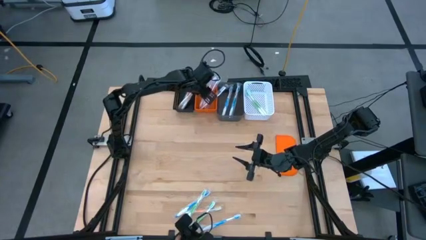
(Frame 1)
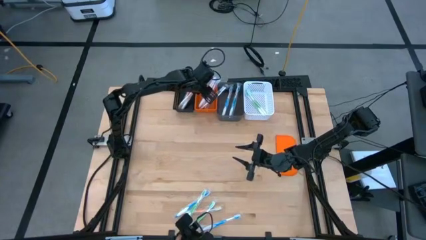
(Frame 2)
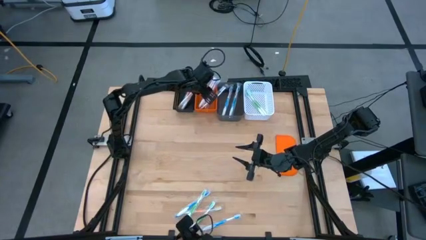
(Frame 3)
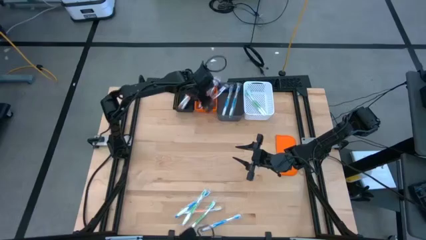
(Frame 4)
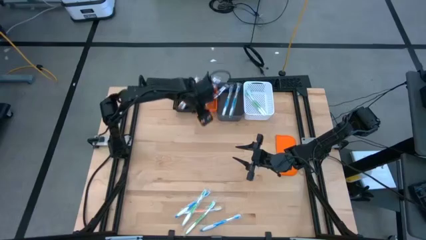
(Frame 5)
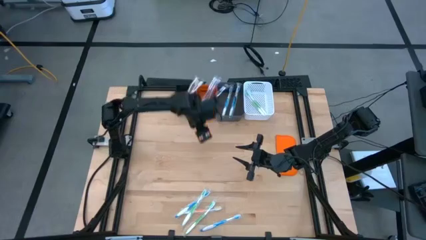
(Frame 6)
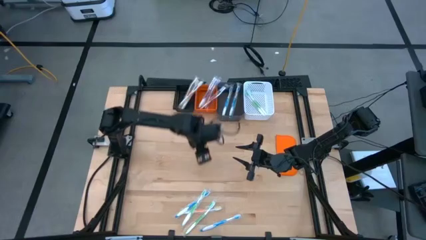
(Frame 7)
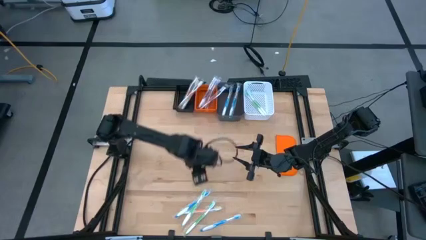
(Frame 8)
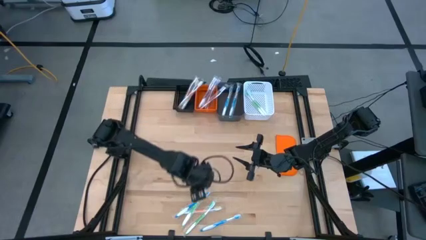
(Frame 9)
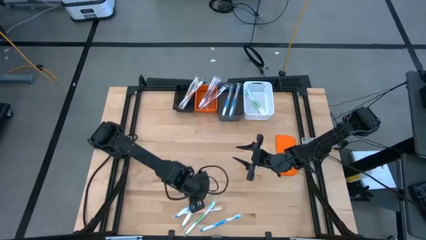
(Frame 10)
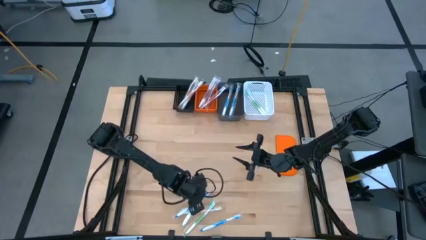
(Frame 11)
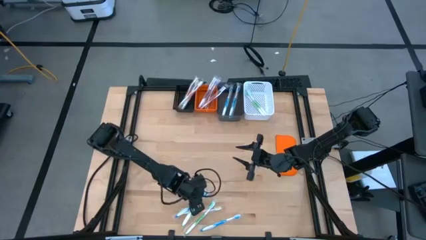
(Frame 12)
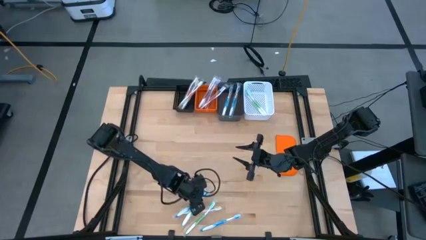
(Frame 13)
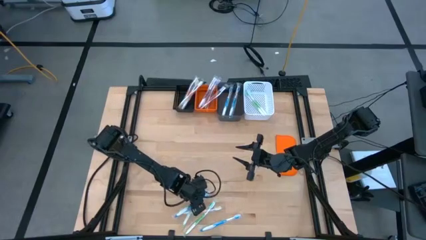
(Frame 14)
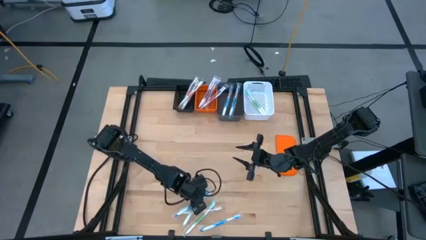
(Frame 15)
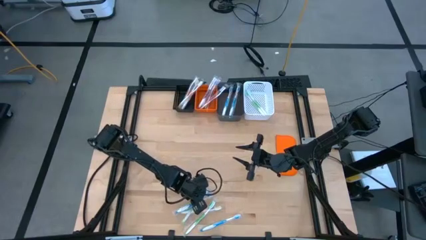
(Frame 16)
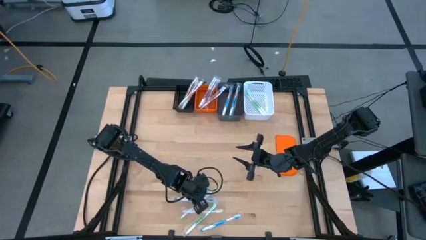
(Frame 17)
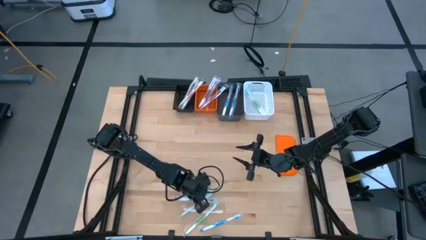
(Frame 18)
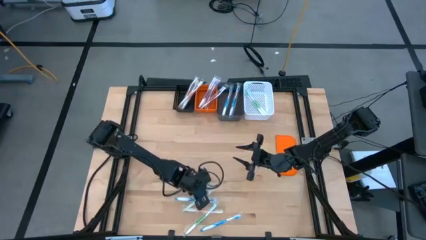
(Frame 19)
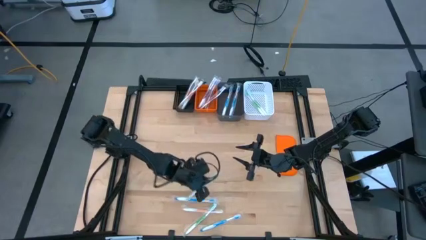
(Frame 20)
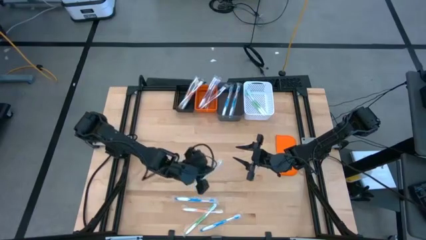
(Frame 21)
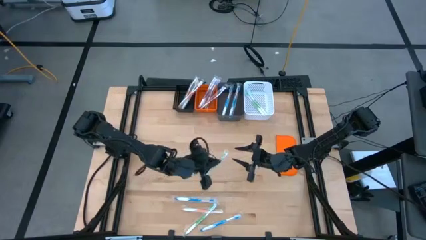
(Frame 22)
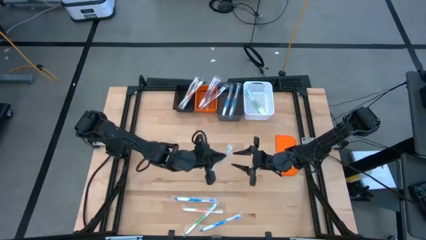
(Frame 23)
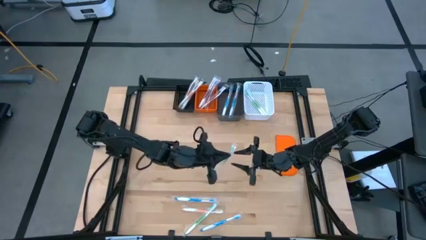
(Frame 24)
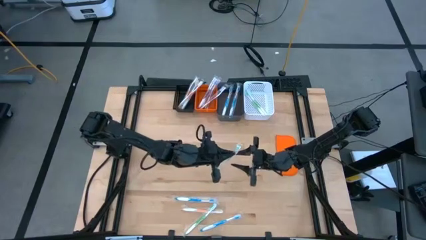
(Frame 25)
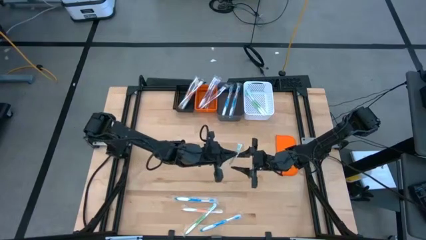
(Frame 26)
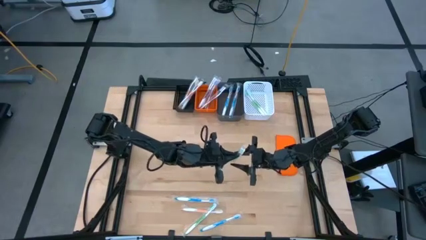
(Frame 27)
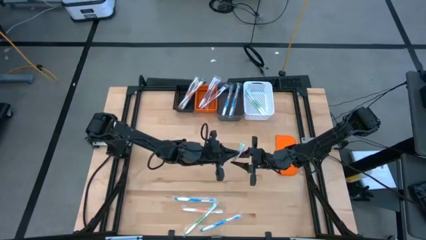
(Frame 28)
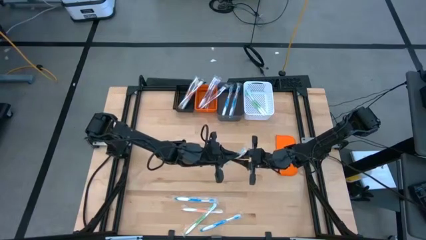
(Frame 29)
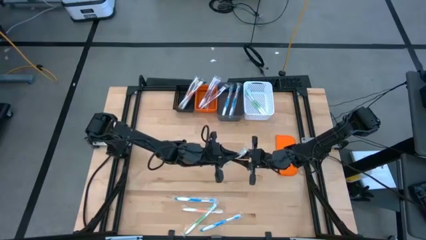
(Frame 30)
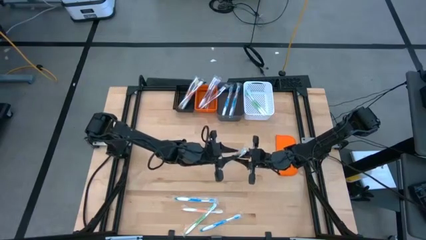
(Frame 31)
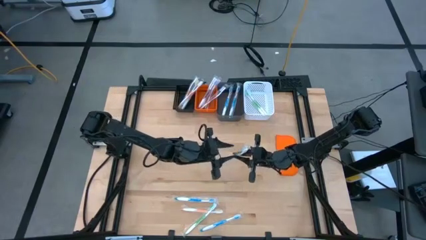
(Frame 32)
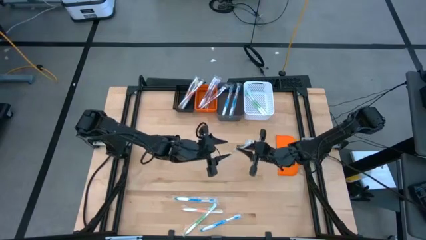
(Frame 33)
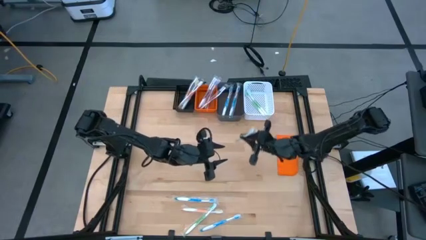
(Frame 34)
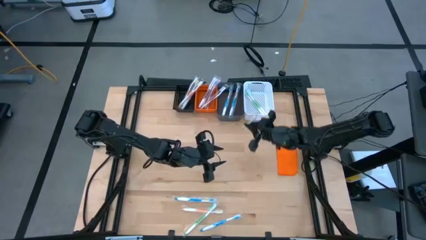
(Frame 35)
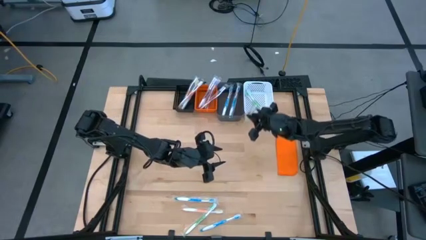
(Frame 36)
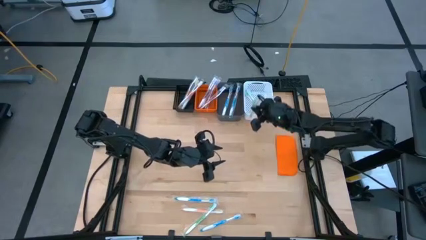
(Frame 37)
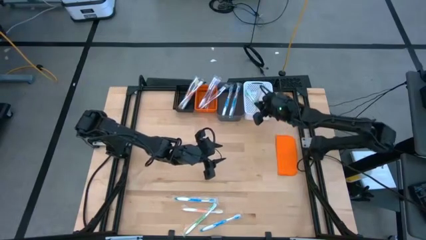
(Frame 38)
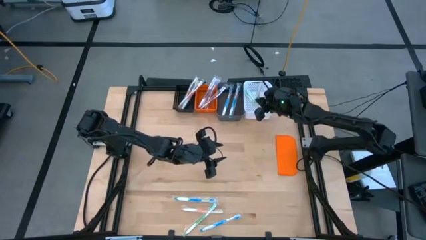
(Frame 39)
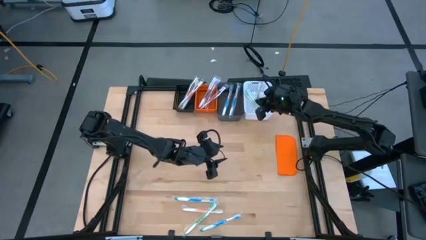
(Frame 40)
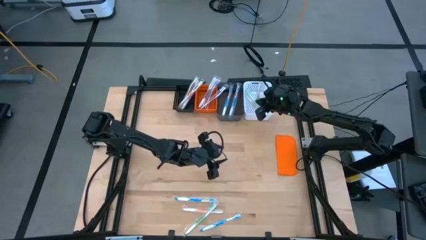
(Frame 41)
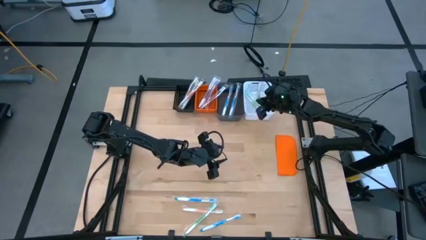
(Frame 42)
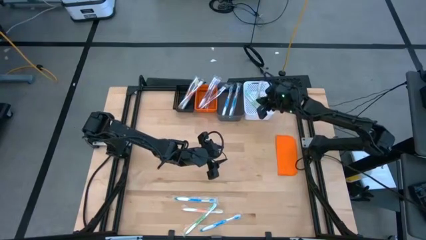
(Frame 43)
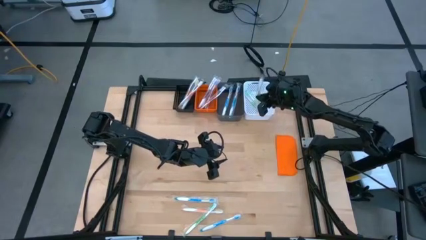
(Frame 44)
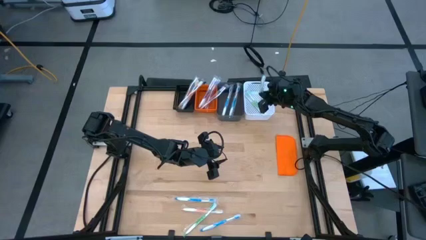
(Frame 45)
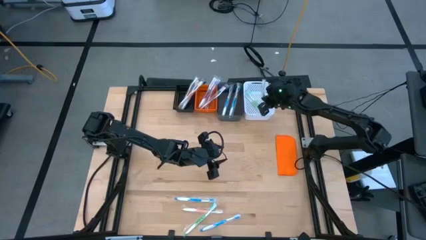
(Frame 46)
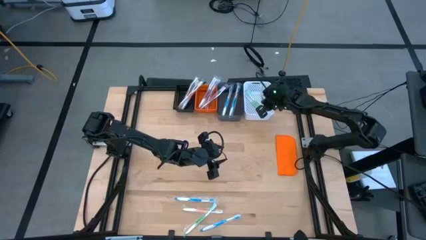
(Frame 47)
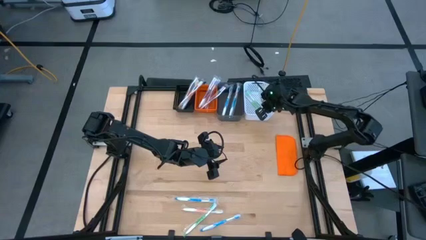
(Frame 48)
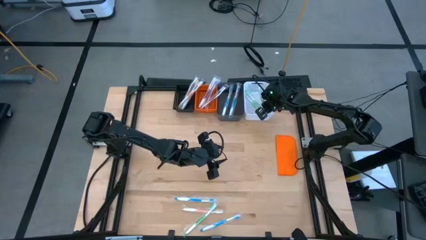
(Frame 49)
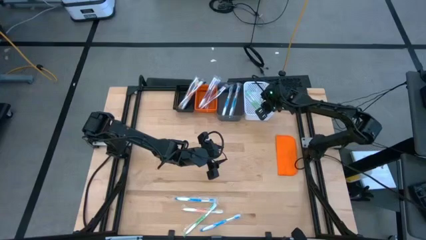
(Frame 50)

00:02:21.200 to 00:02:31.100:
Task: Pick & Place Toothbrushes
Put the green toothbrush into the white bin

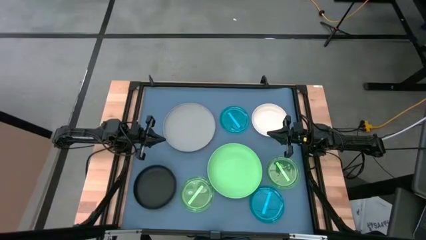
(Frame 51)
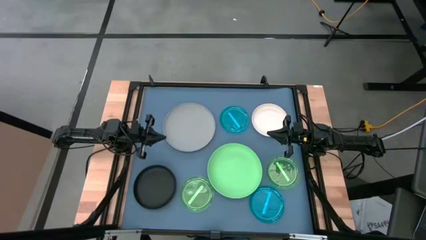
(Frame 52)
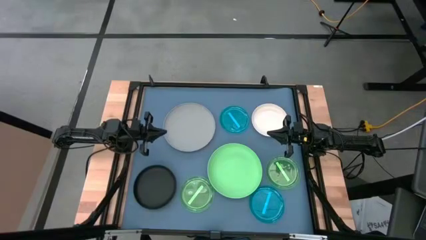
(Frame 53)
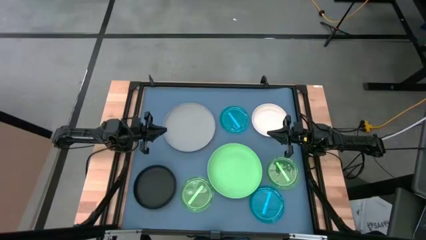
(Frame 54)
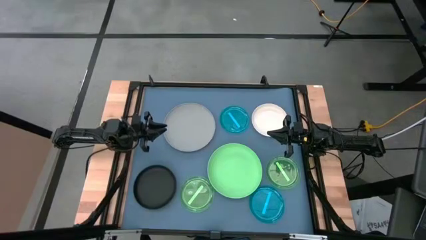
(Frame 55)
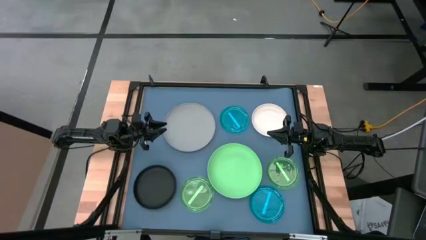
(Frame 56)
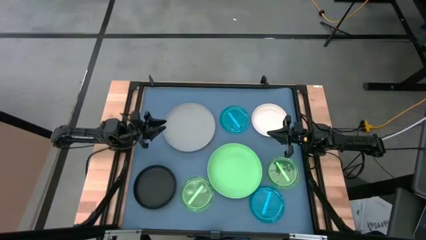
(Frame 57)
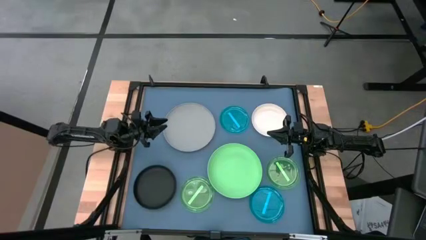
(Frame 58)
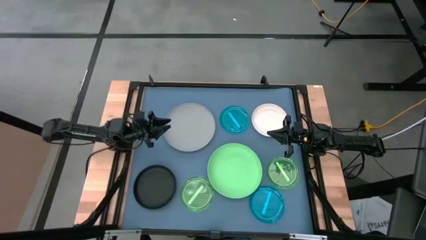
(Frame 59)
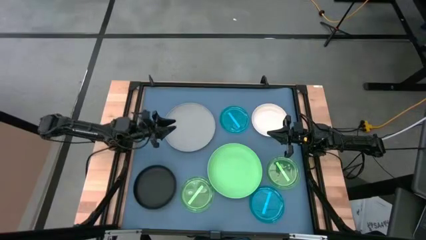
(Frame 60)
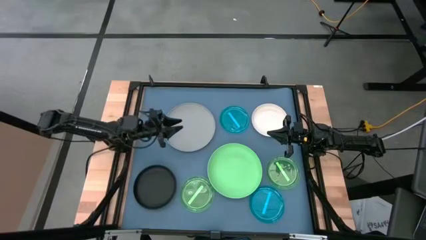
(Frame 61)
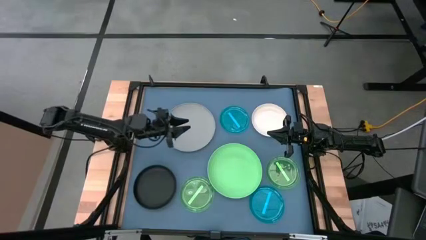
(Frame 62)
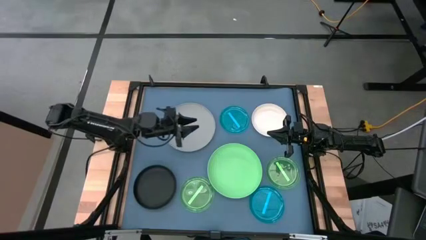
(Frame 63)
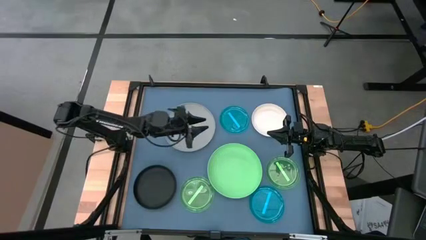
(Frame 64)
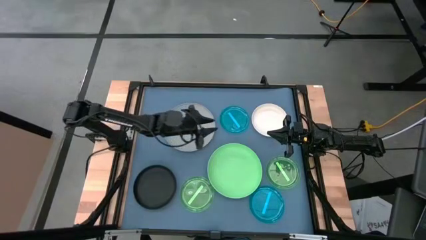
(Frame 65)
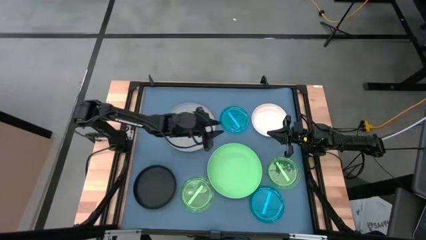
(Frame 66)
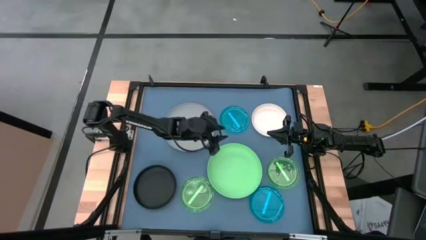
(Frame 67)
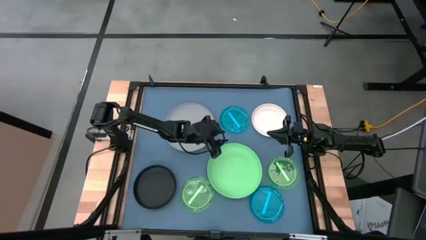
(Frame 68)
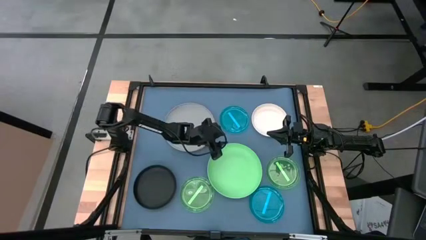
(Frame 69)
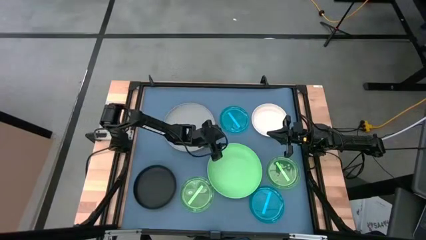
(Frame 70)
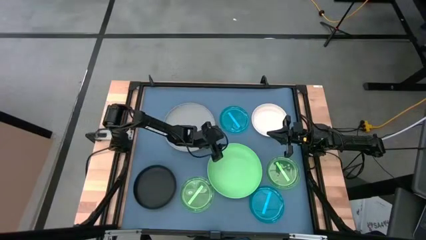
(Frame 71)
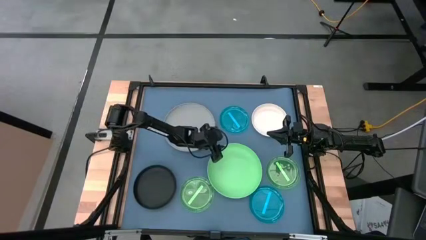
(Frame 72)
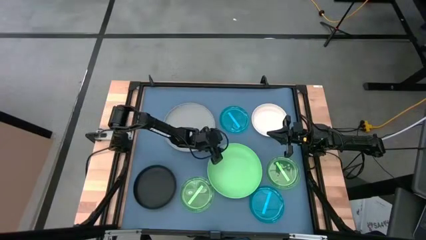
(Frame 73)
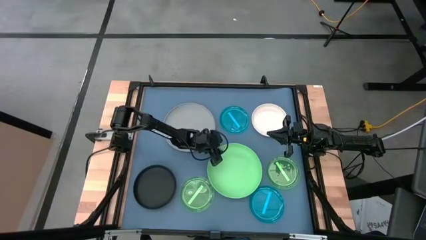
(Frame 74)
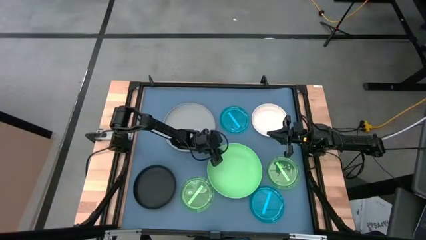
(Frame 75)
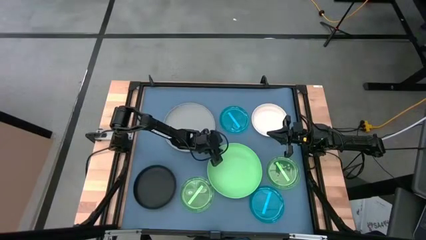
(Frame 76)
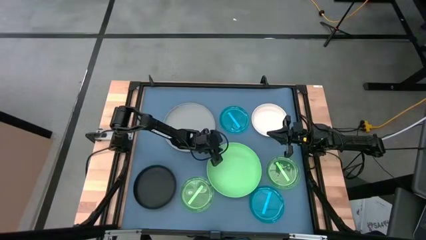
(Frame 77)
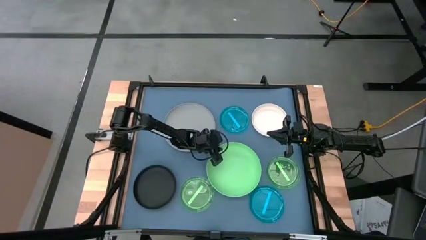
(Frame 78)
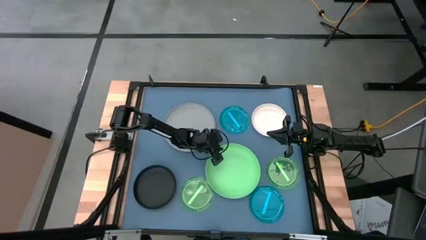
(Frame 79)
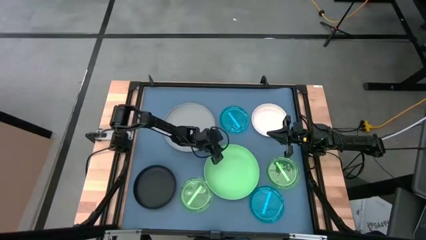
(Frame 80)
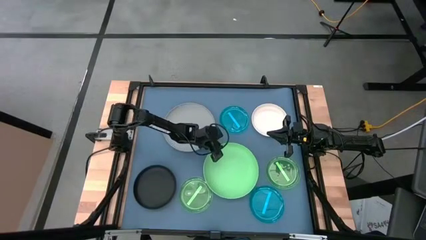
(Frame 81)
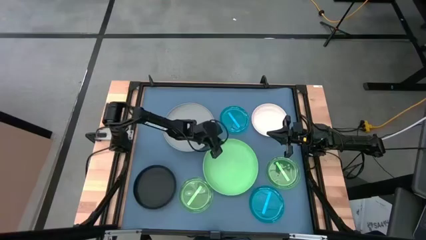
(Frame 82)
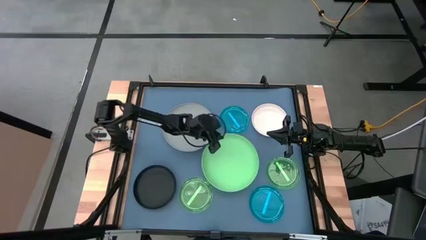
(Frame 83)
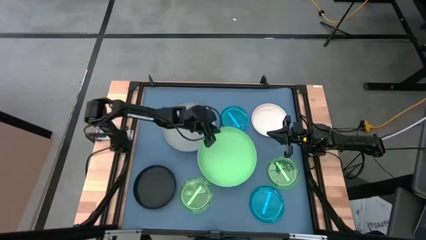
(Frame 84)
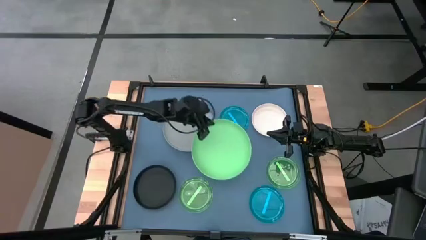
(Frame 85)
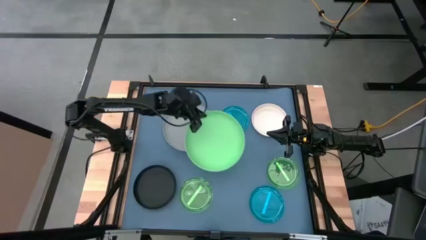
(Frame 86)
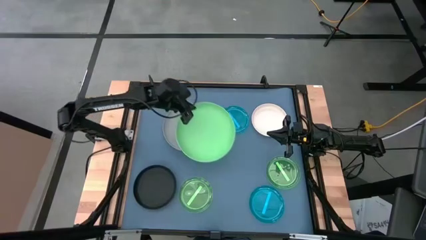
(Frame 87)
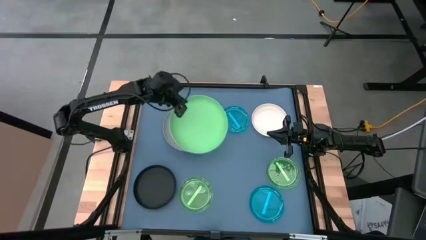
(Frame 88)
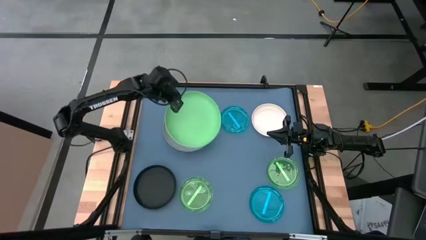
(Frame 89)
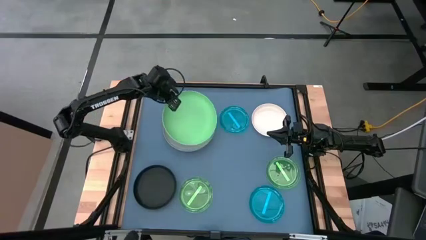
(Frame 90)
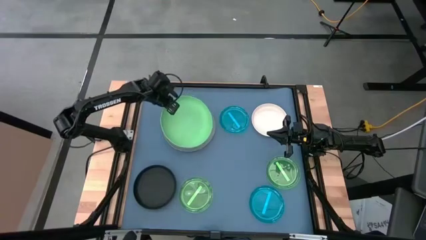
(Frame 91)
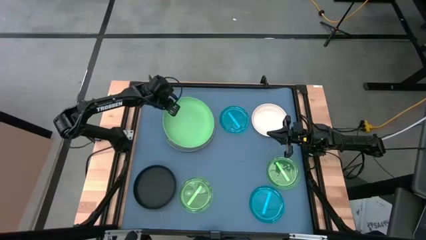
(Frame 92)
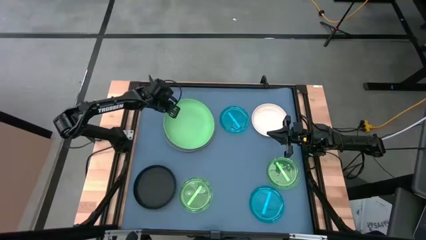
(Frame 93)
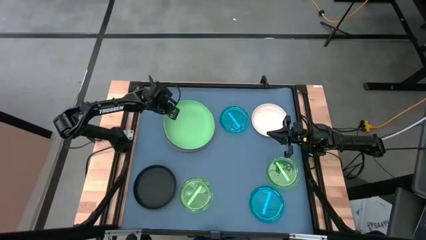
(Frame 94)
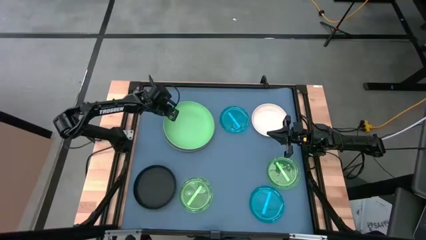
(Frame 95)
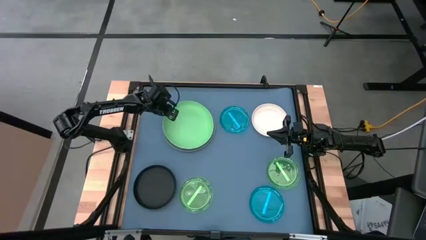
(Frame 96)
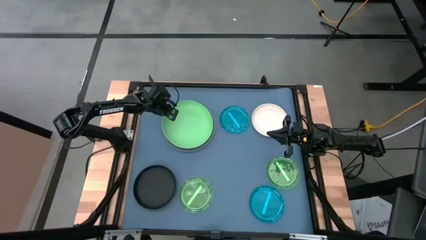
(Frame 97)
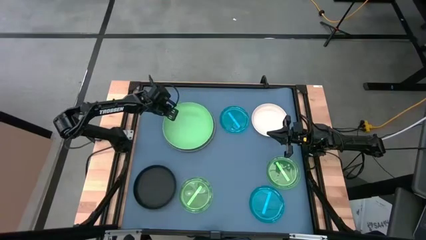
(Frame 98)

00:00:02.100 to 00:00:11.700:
Task: Stack plastic plates
Stack the green plate on top of the gray plate
